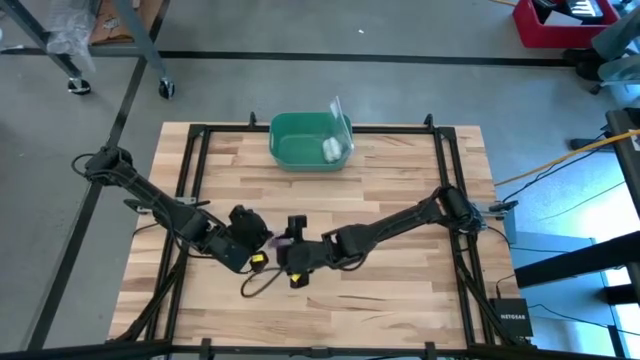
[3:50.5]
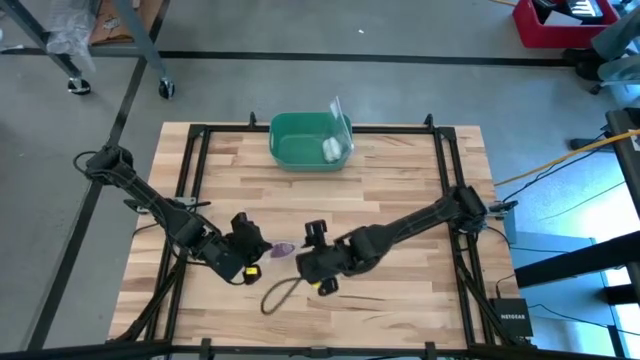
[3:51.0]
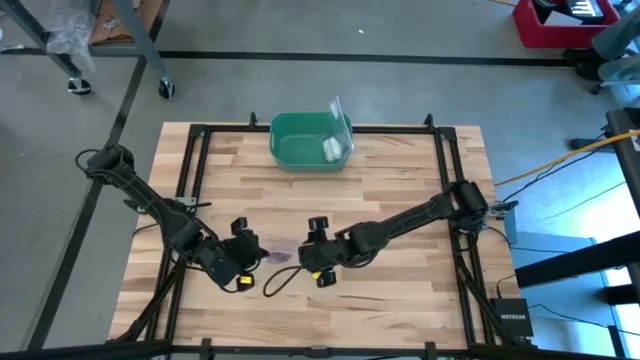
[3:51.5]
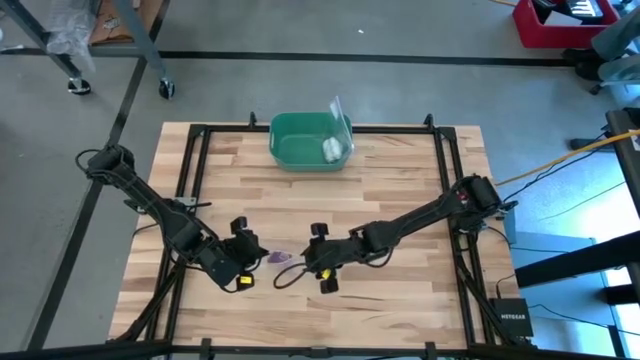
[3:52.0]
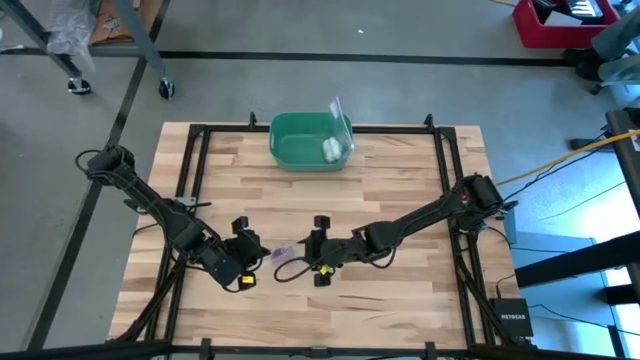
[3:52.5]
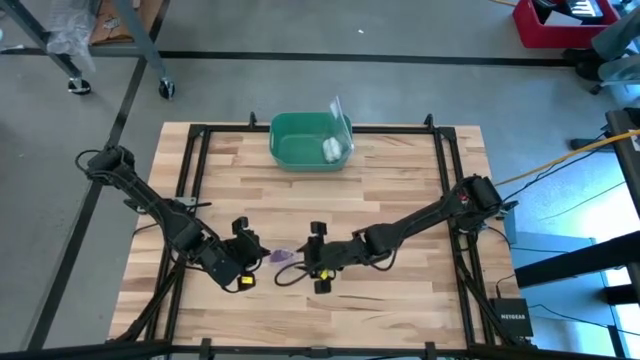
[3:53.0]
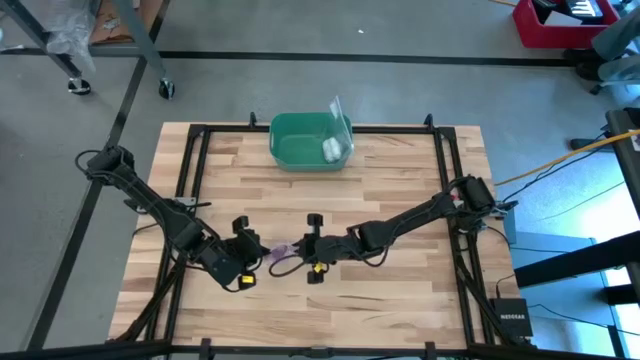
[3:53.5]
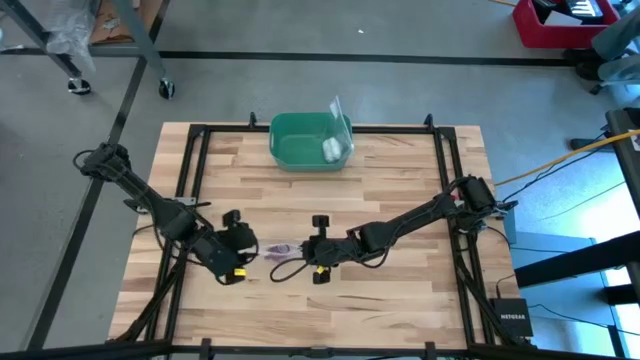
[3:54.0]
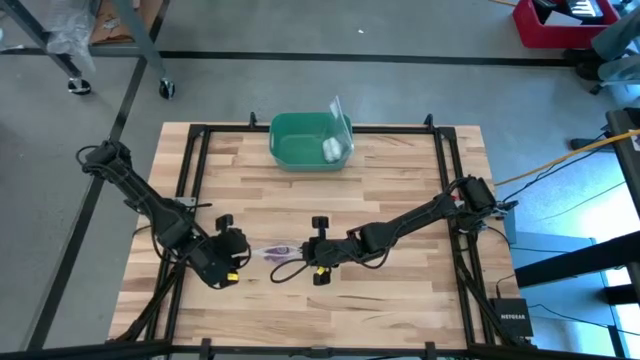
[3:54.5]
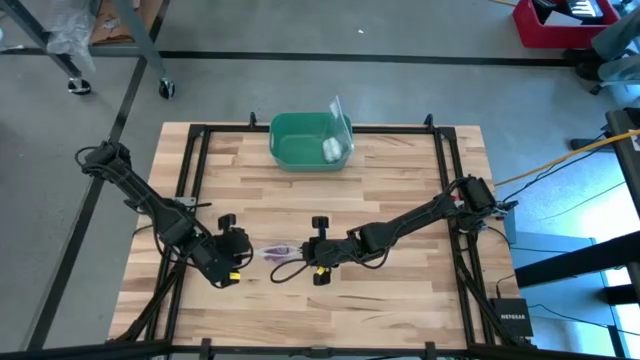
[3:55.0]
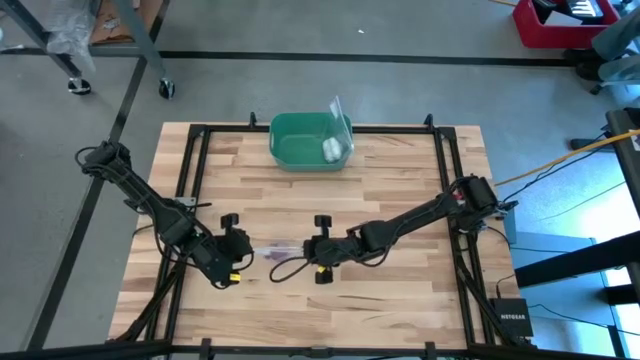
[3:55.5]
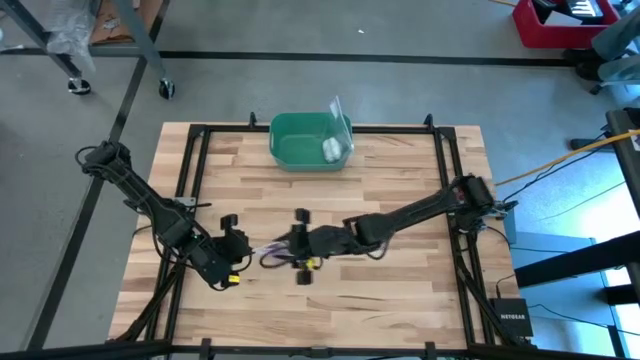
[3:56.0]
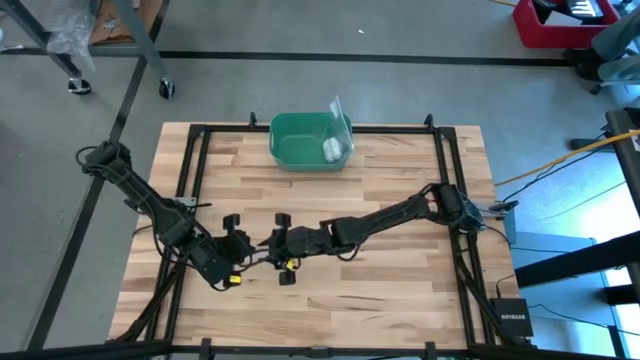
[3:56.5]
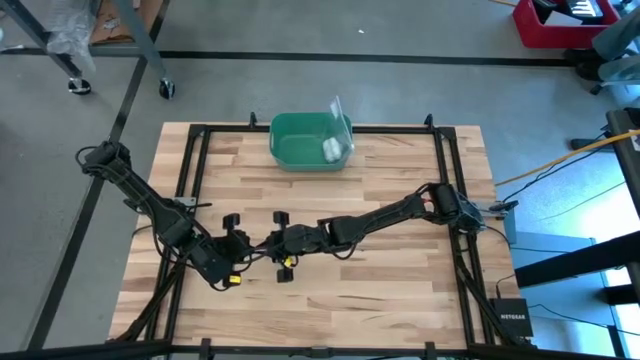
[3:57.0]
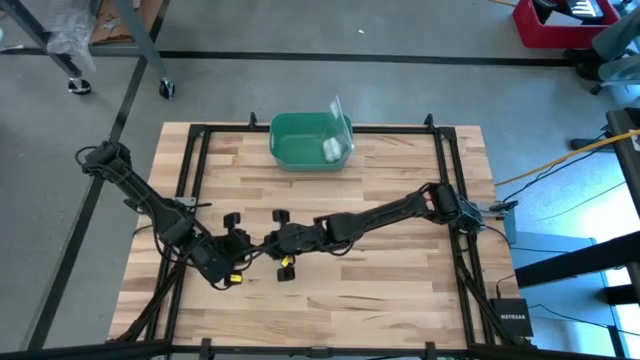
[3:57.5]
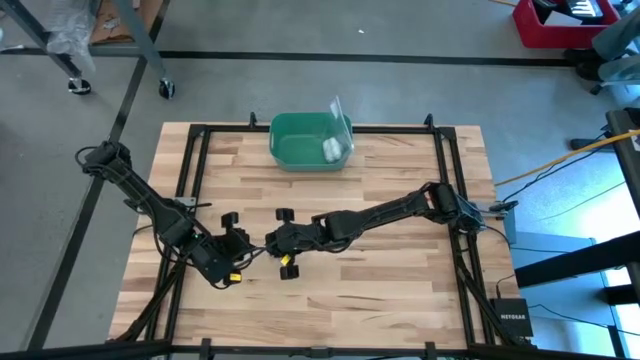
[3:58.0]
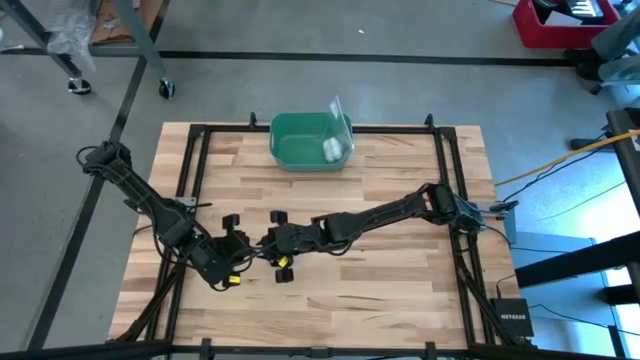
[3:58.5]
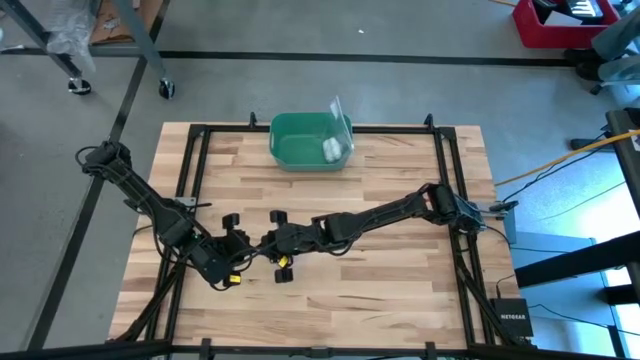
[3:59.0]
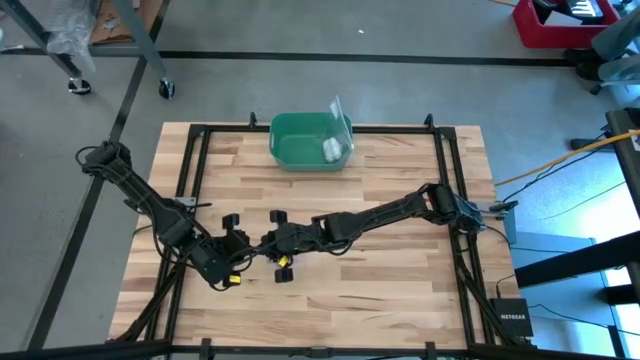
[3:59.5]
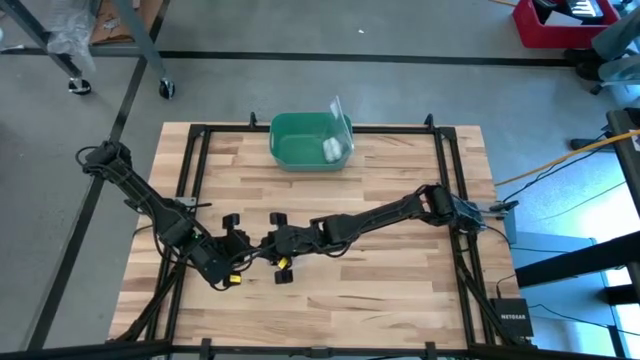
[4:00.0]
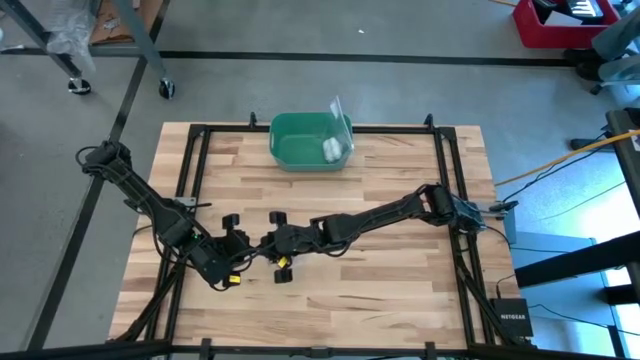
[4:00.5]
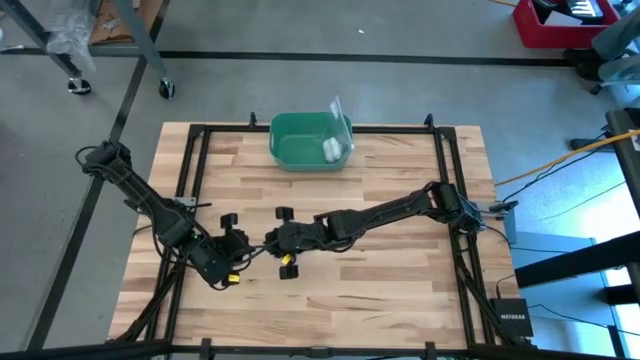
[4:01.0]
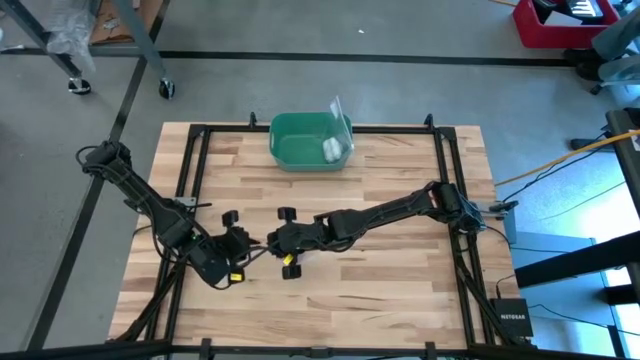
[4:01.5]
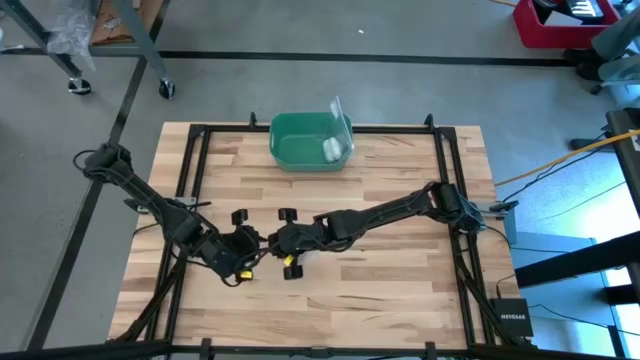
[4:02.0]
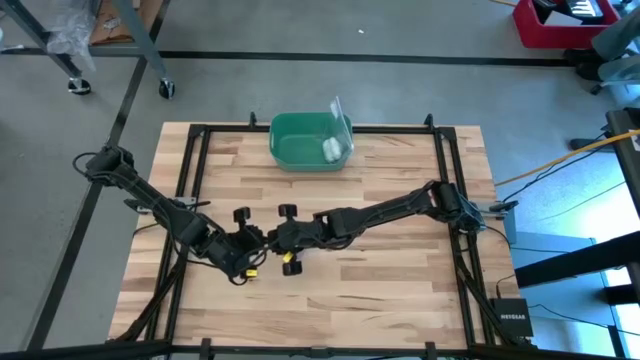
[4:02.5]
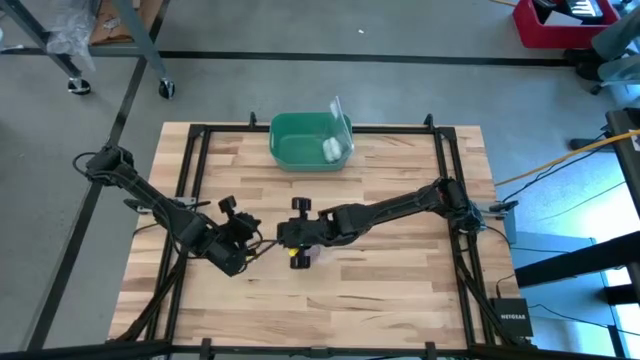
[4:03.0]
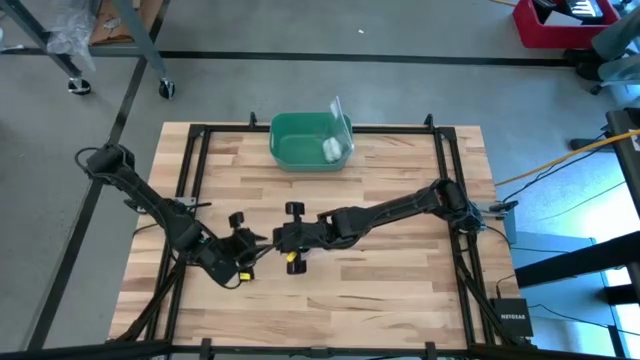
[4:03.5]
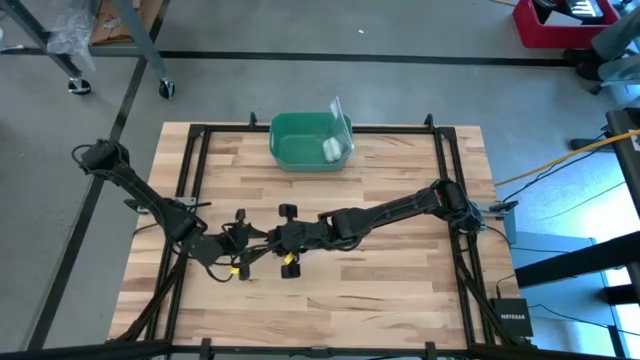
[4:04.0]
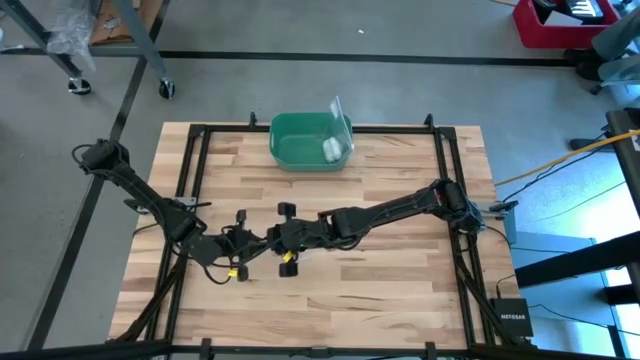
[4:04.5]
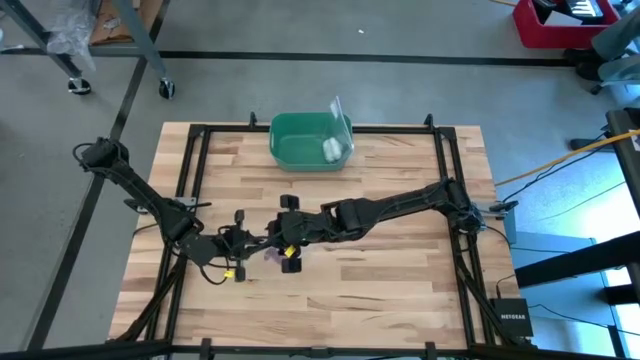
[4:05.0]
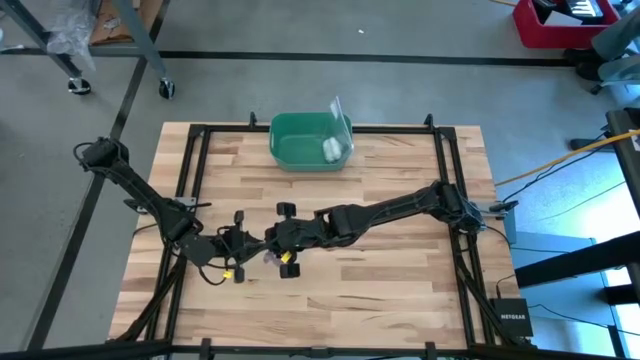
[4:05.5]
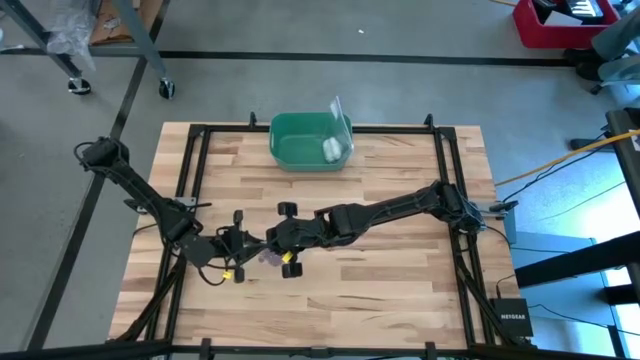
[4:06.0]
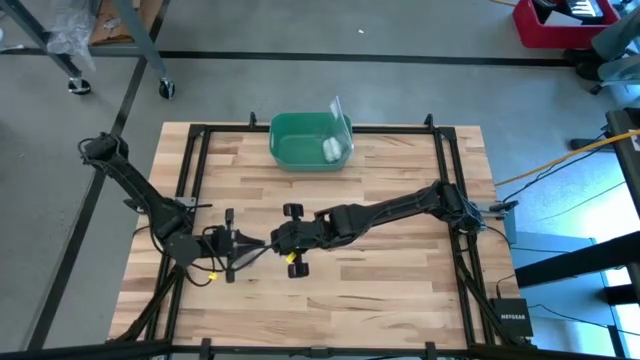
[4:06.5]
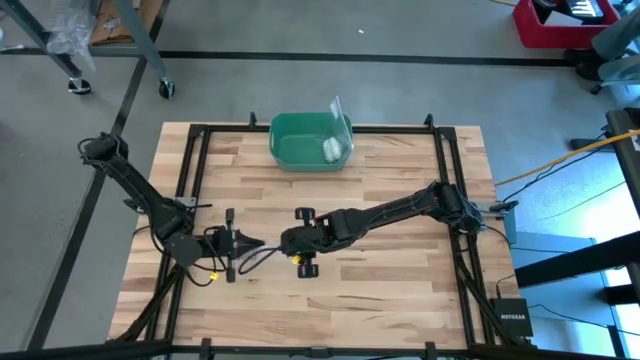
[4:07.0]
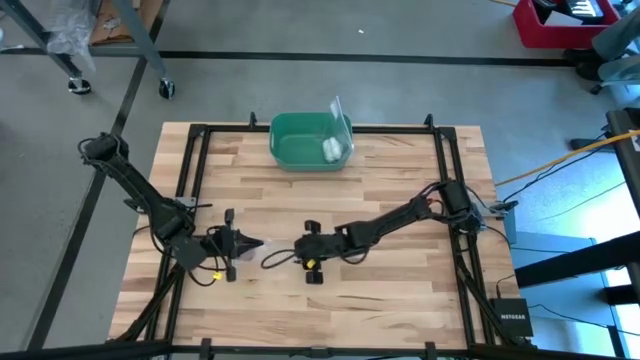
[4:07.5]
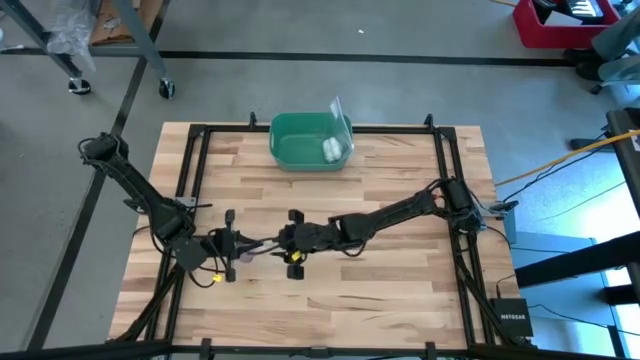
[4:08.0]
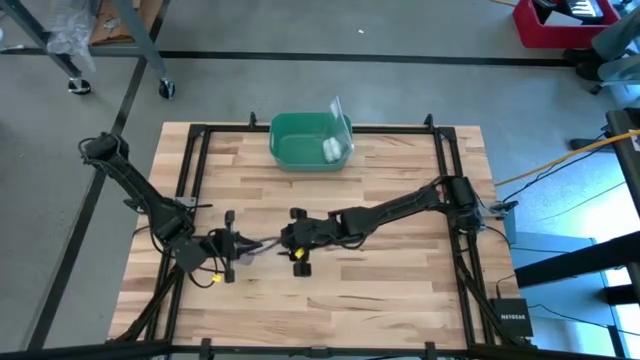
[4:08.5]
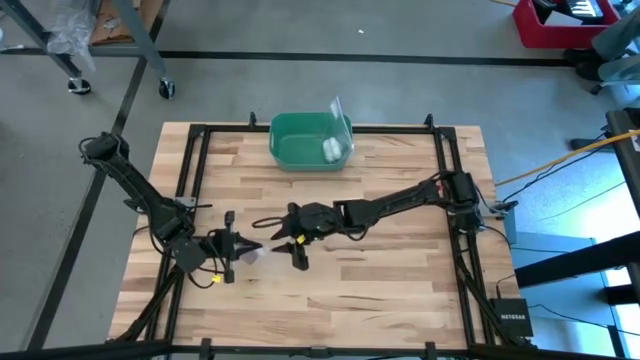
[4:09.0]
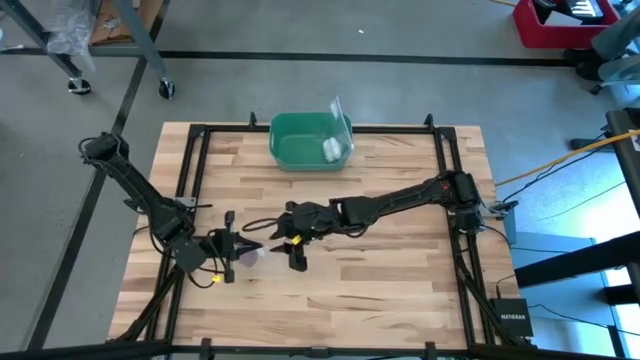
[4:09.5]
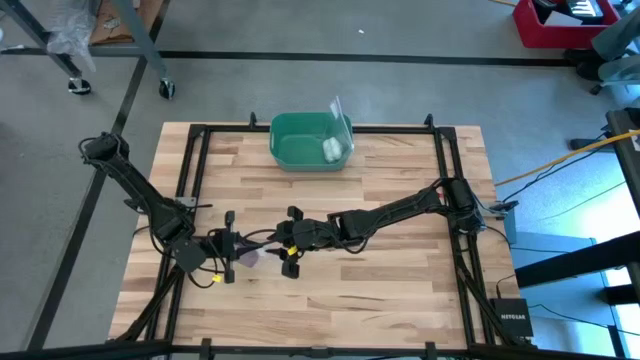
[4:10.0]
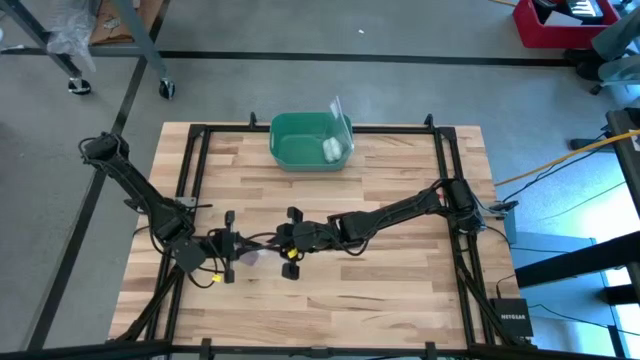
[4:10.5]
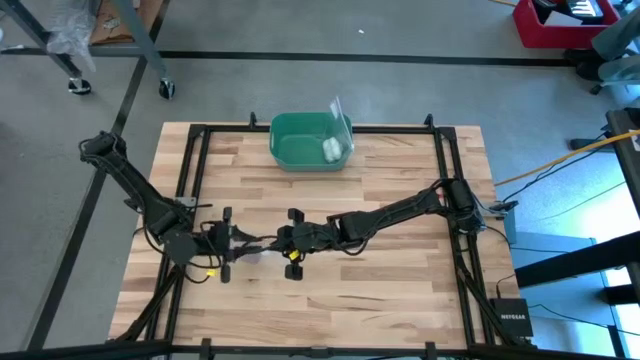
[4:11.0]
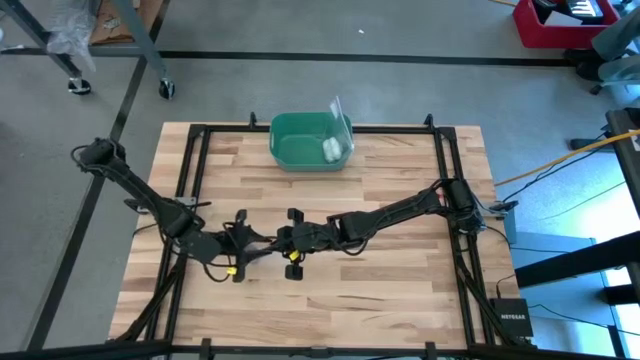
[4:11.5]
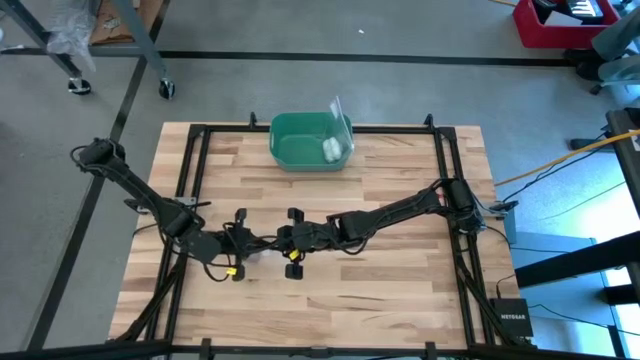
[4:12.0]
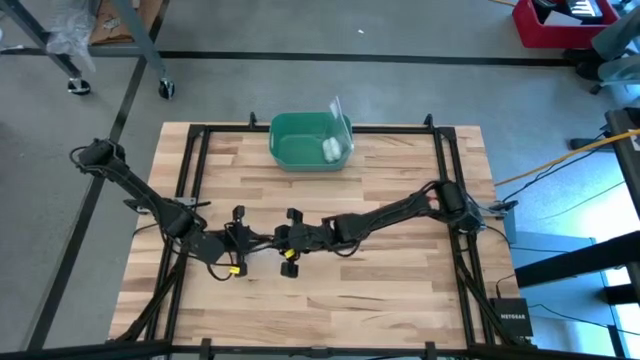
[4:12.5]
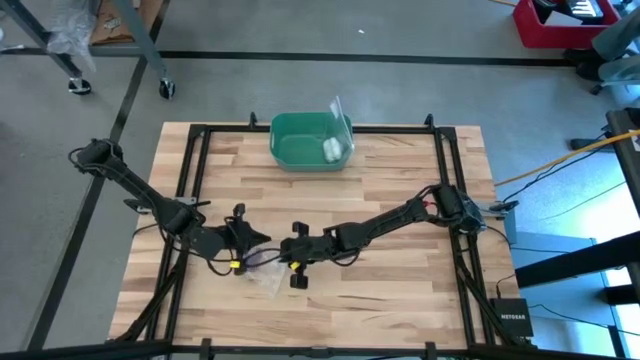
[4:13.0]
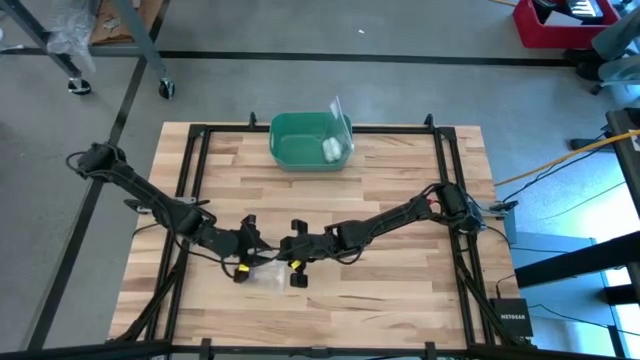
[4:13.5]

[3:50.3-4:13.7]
Task: Roll bandage
Close the zip bag
